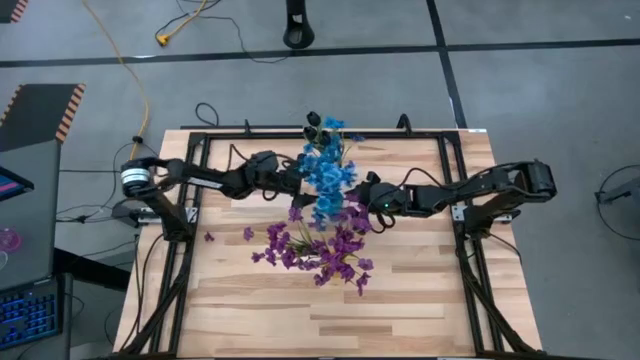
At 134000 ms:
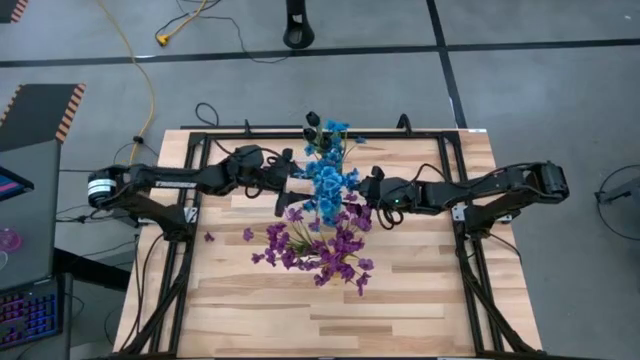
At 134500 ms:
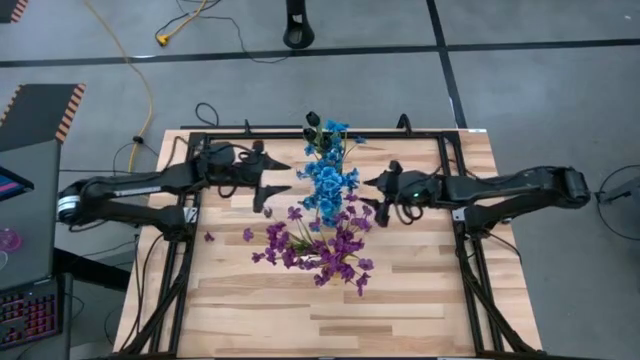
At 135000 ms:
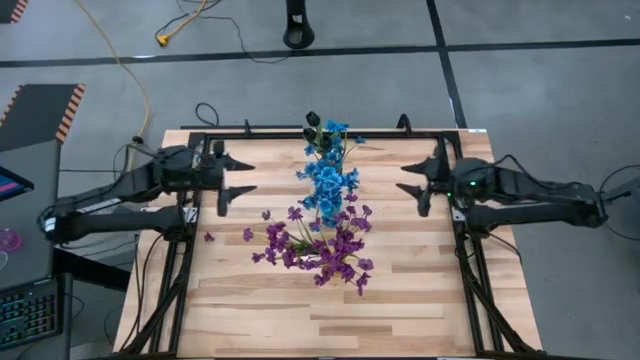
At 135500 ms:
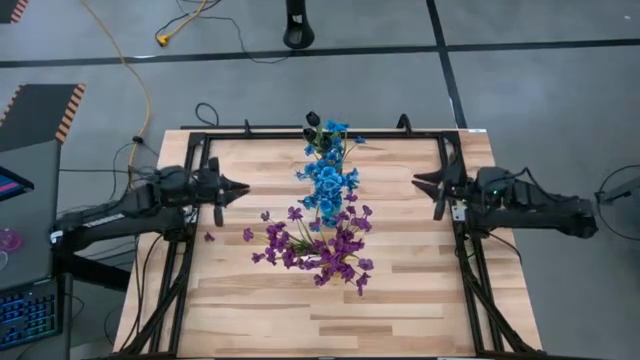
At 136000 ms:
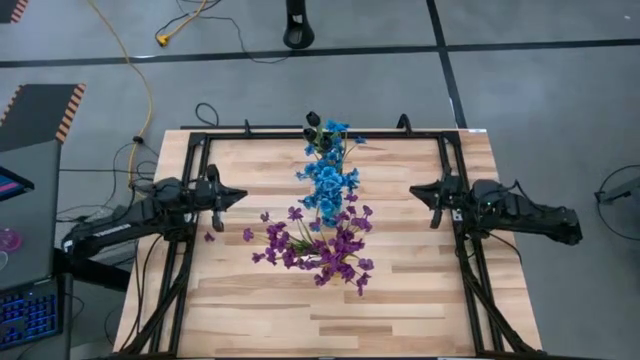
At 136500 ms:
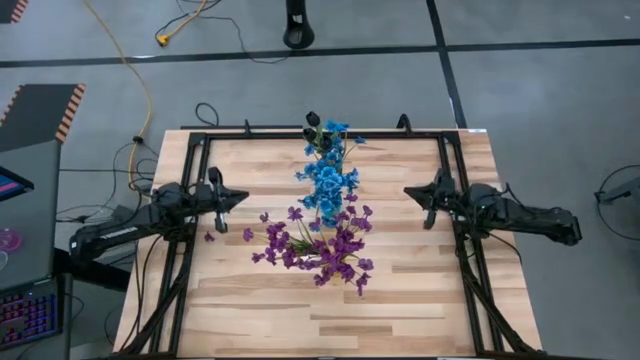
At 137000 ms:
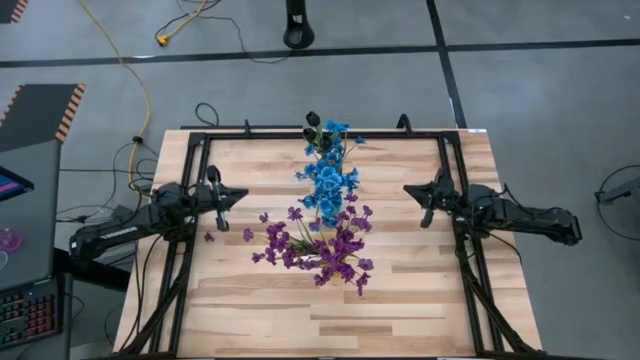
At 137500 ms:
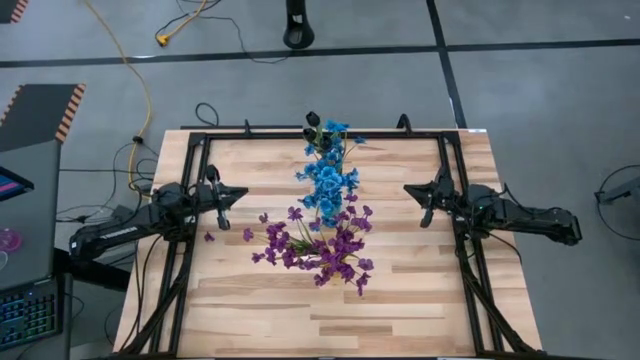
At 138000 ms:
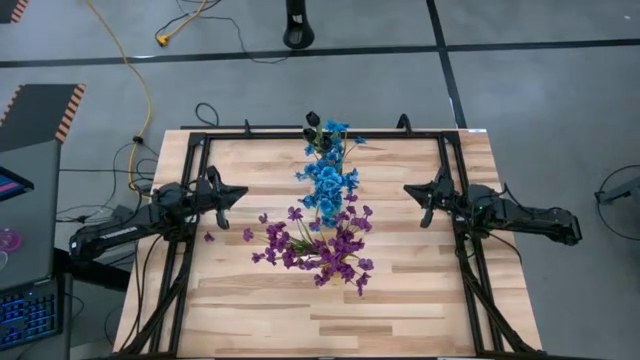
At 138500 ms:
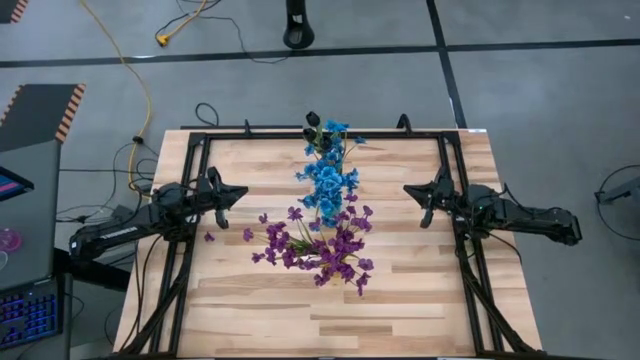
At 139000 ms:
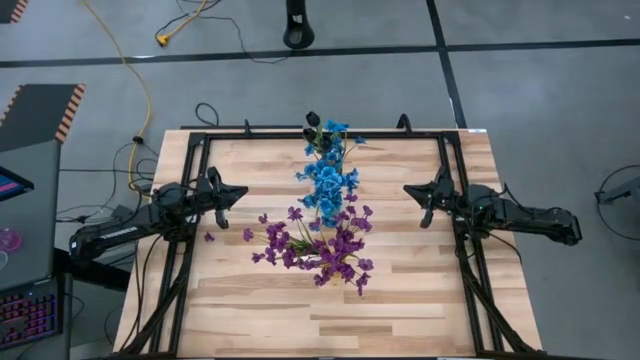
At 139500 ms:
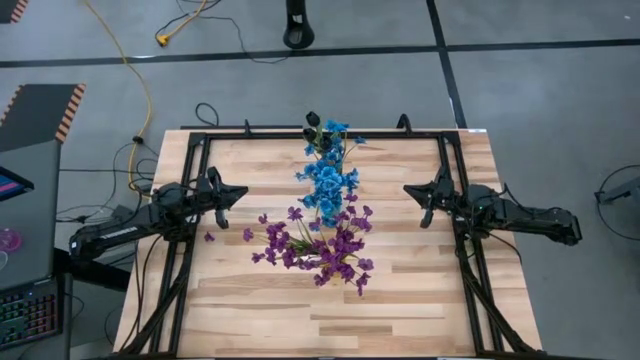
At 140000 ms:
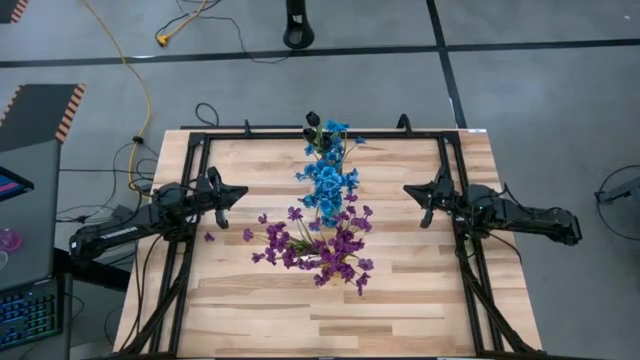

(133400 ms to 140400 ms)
Task: Sort flowers into vase by color
Return to Home Position

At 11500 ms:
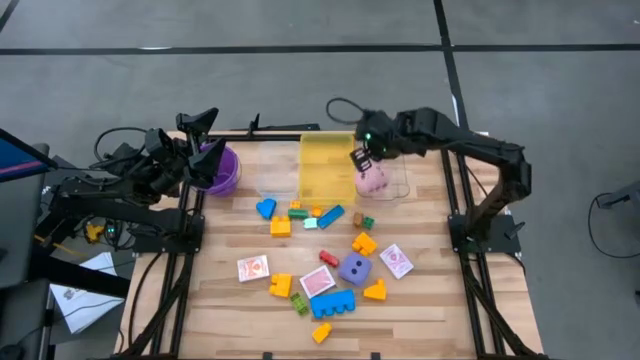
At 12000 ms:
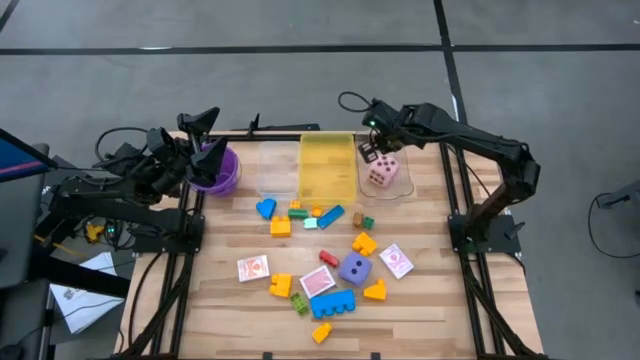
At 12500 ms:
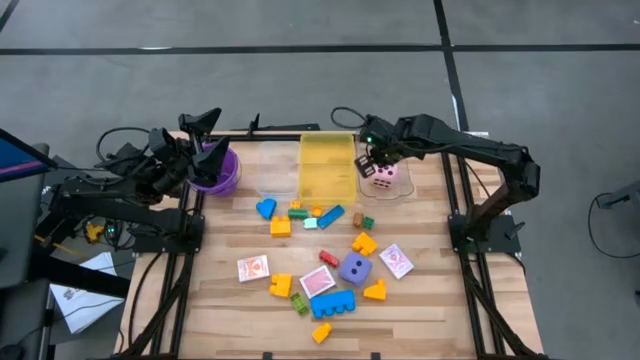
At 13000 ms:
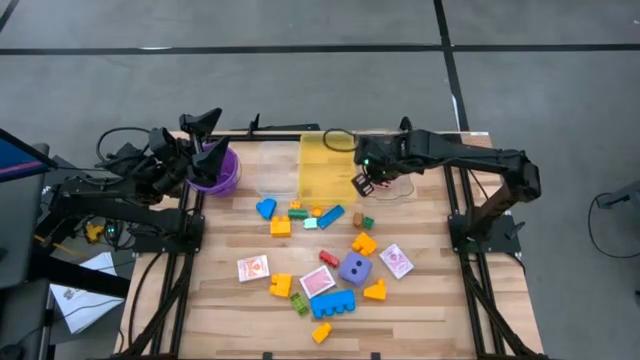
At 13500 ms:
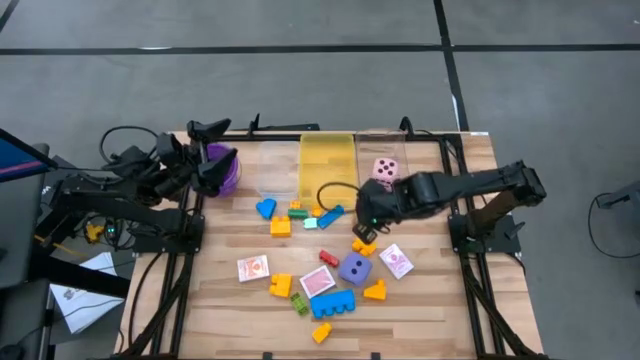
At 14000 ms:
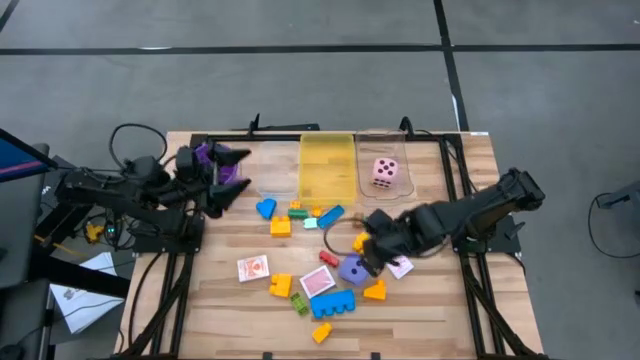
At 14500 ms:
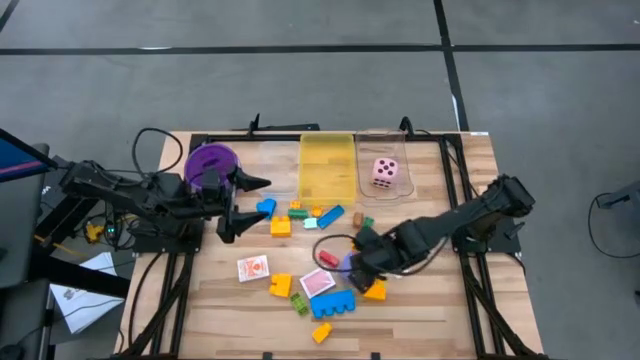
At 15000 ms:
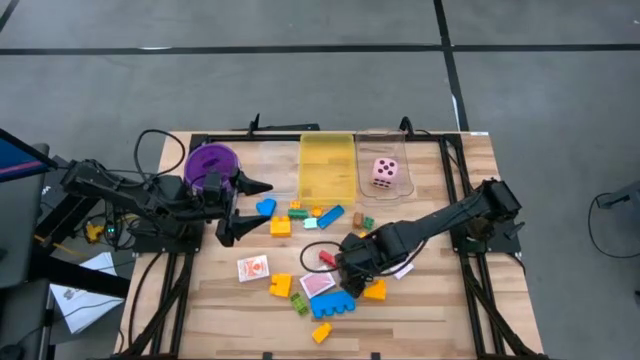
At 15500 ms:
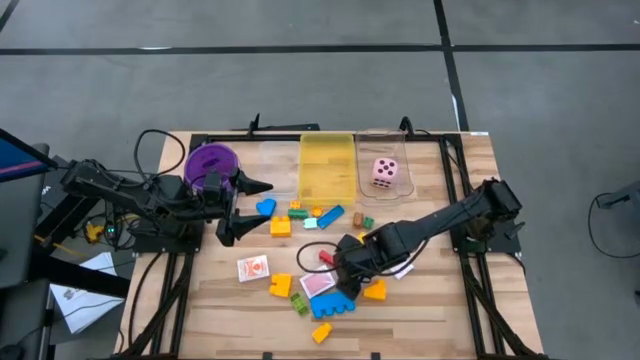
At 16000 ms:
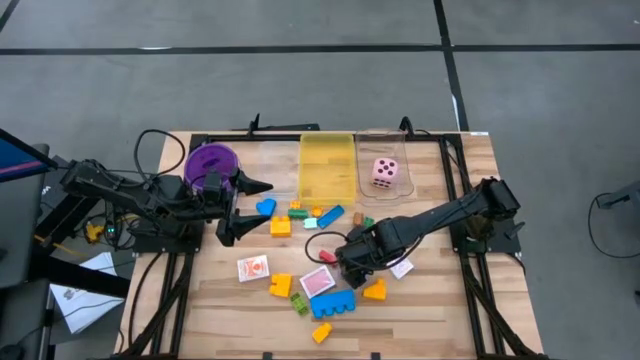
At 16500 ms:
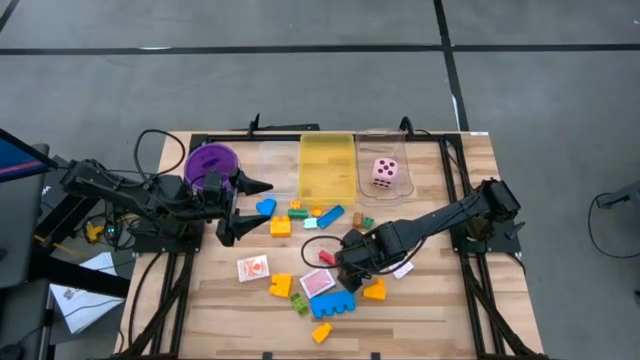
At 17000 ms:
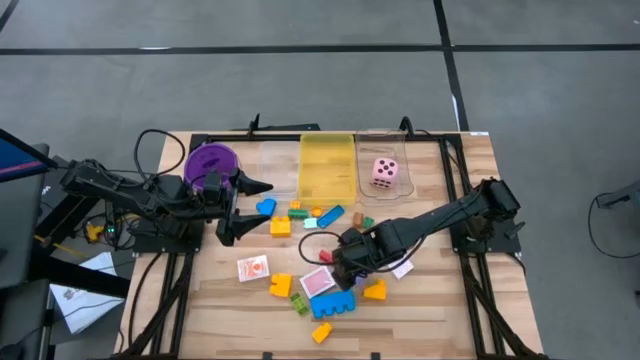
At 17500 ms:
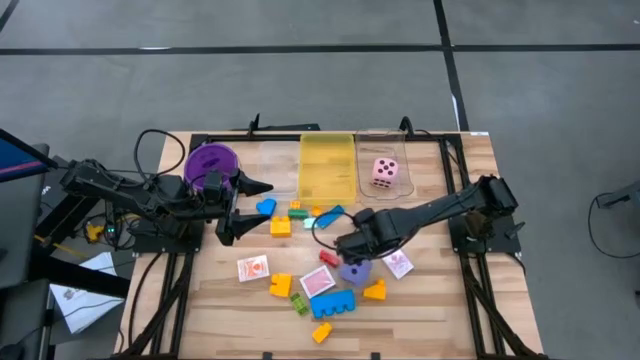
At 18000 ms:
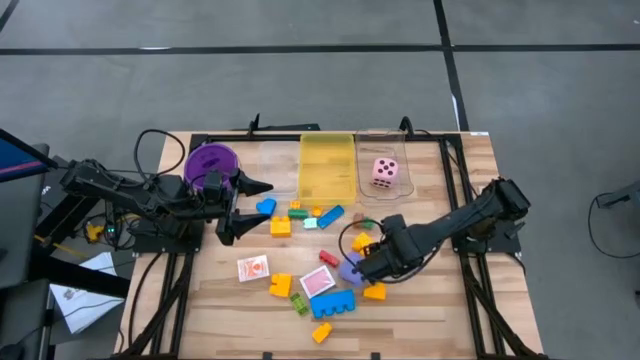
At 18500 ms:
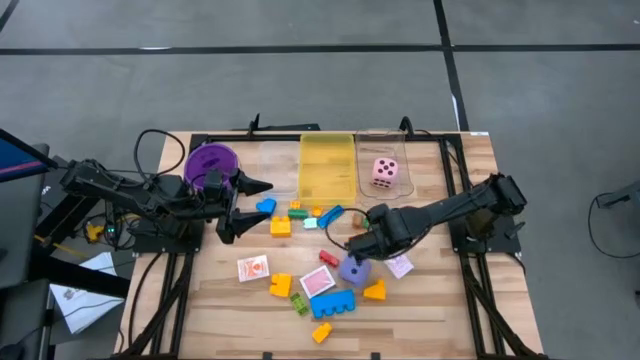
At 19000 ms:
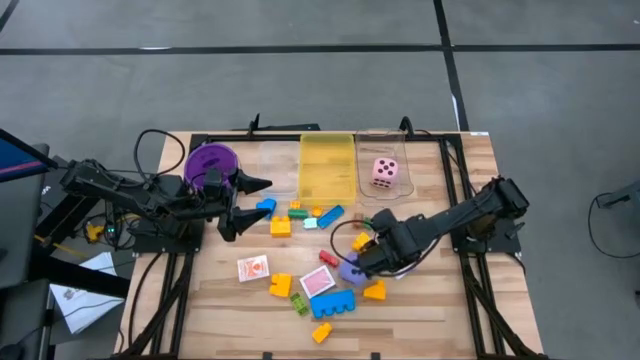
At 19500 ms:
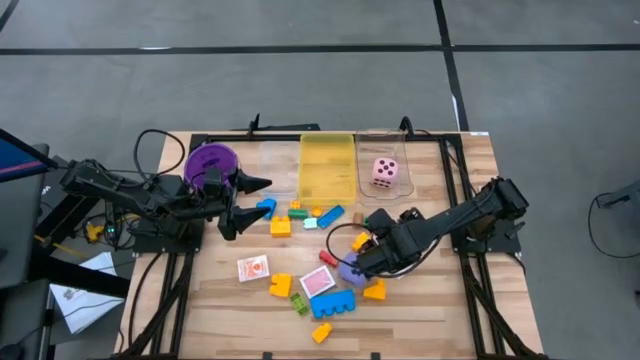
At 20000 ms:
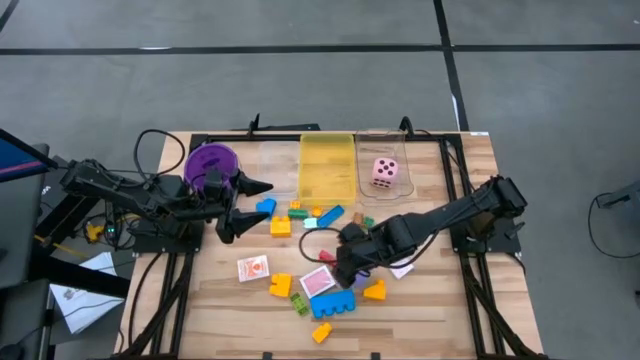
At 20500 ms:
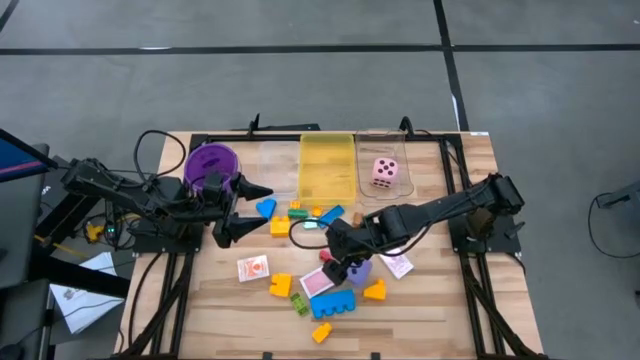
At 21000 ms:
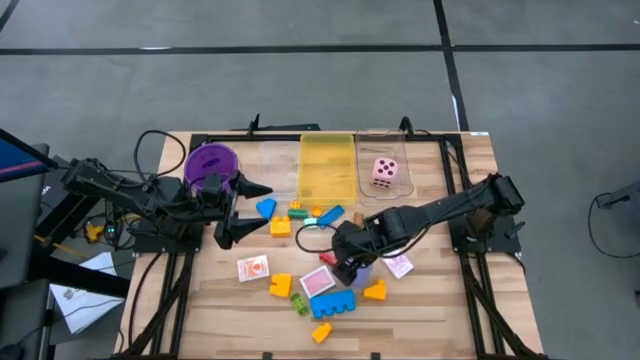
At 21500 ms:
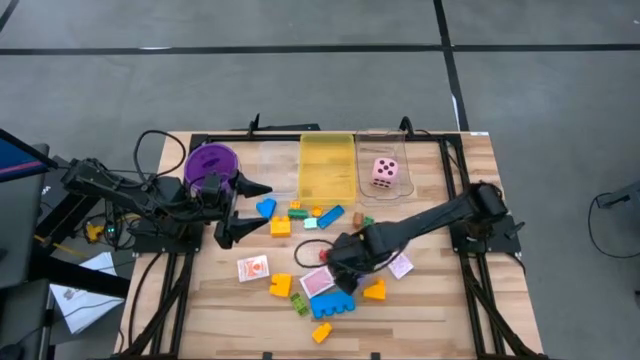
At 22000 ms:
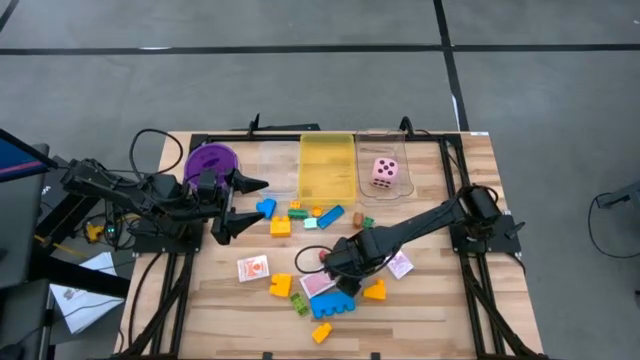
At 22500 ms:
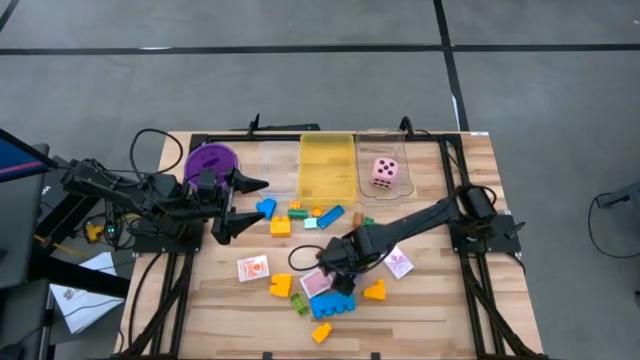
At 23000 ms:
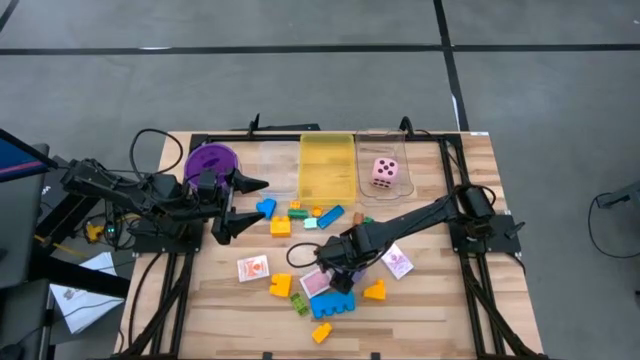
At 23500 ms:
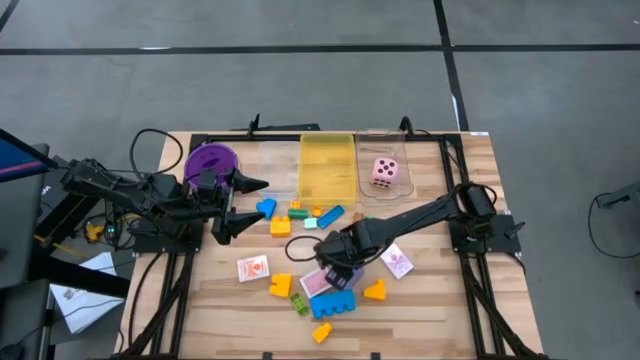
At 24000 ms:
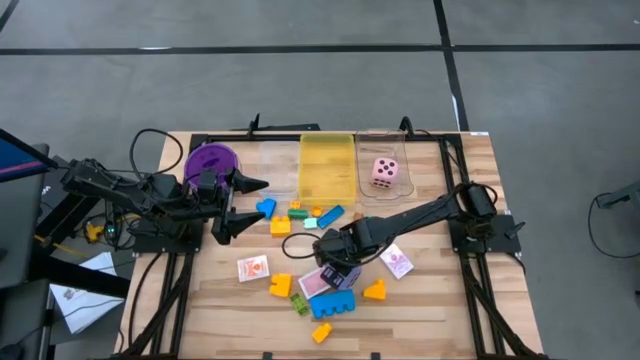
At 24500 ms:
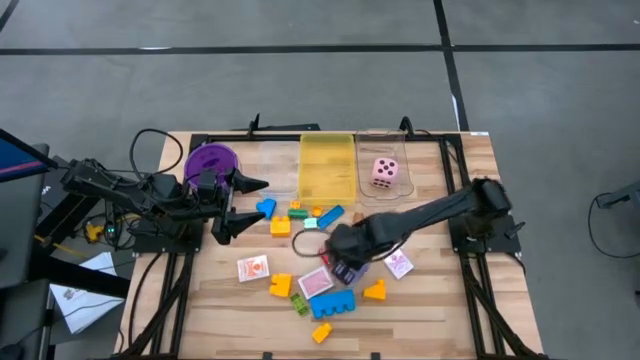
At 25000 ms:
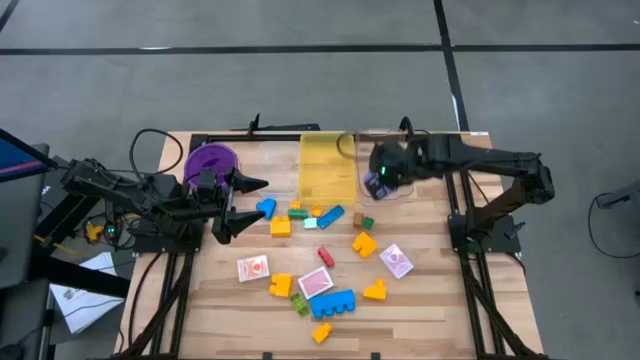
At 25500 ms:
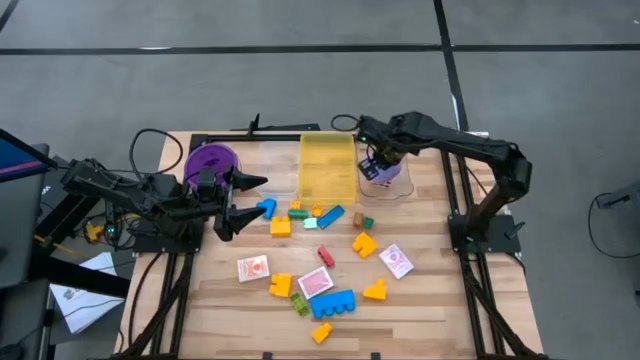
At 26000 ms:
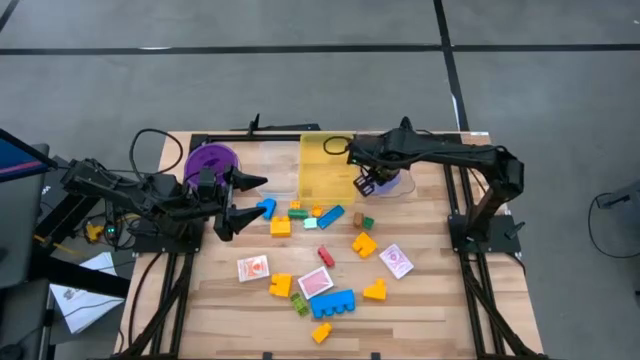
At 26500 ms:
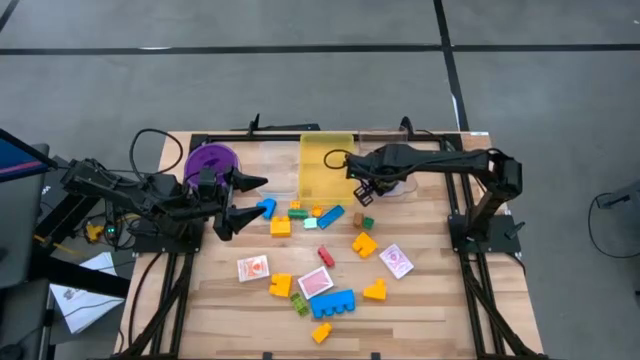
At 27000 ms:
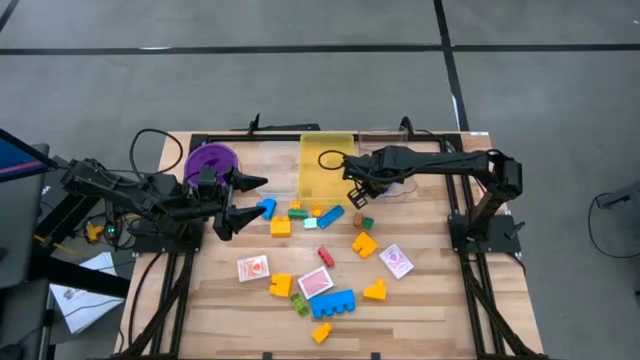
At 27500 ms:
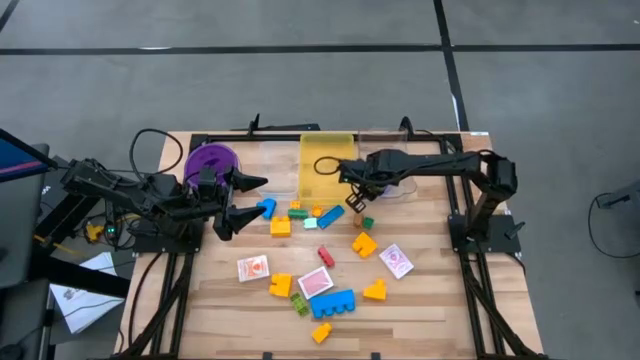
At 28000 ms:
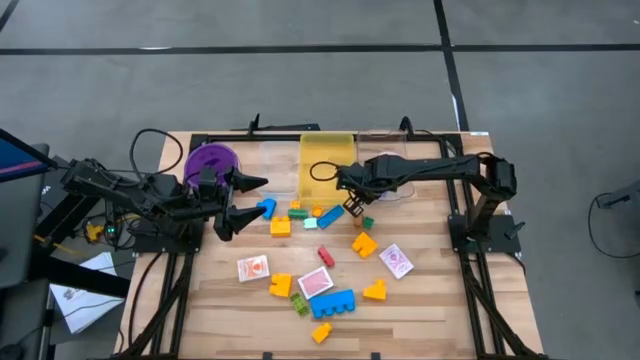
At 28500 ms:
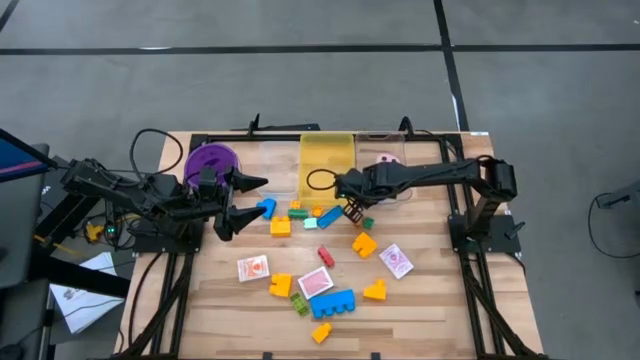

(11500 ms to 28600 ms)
Task: Pick & Place Toys
Put the violet dice into the transparent bin
